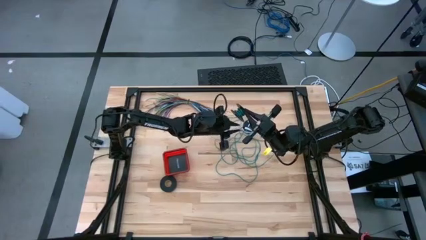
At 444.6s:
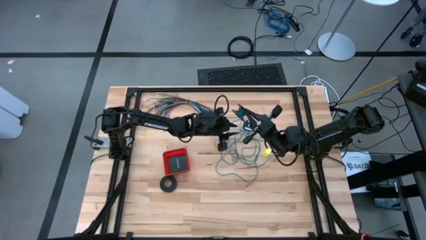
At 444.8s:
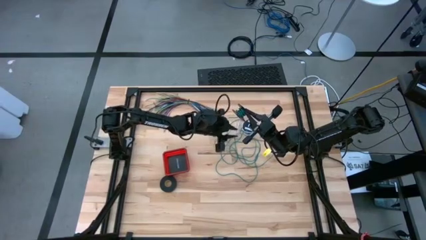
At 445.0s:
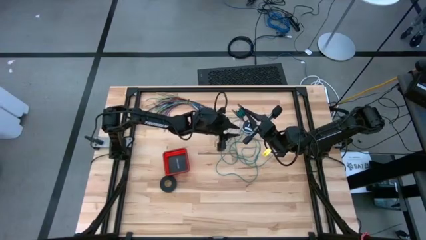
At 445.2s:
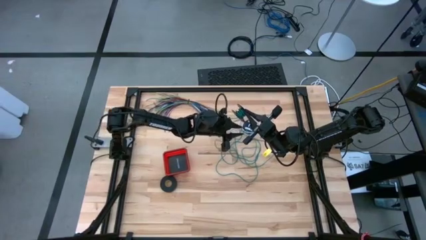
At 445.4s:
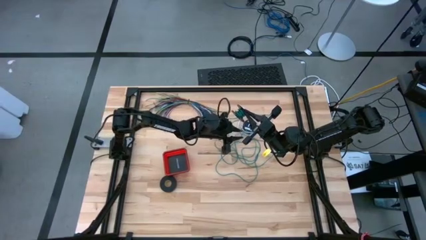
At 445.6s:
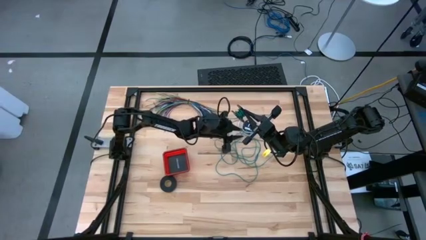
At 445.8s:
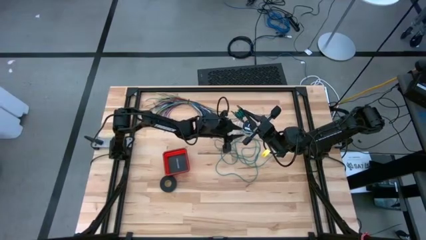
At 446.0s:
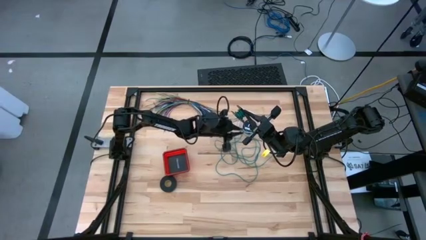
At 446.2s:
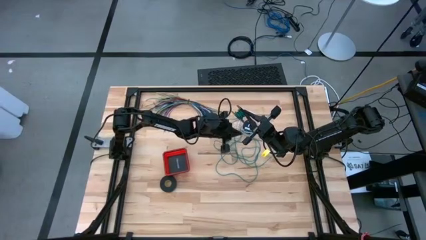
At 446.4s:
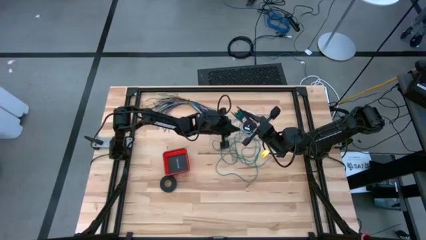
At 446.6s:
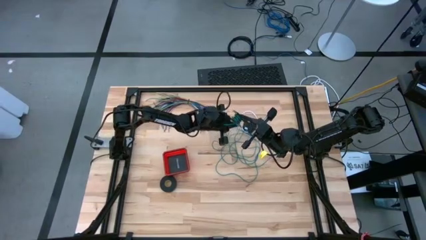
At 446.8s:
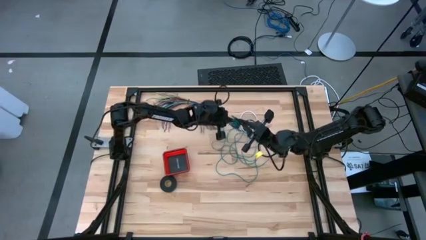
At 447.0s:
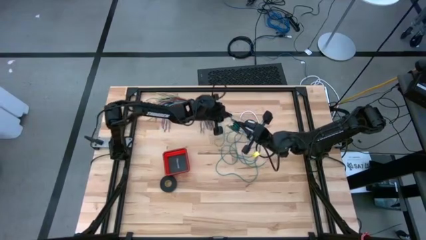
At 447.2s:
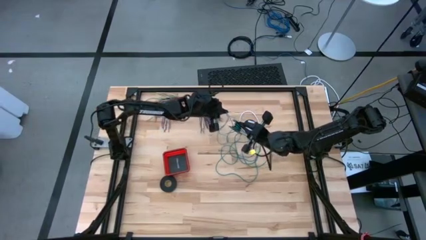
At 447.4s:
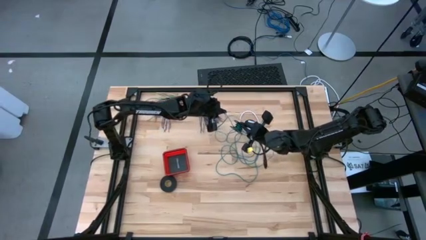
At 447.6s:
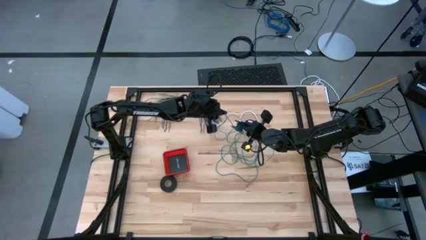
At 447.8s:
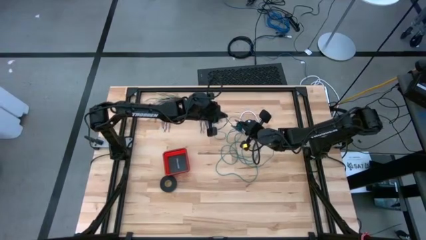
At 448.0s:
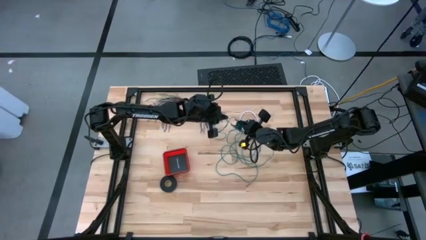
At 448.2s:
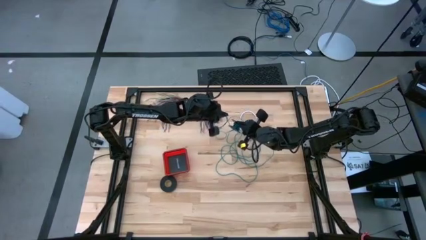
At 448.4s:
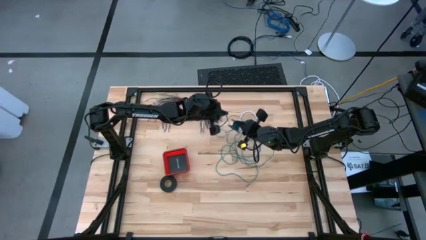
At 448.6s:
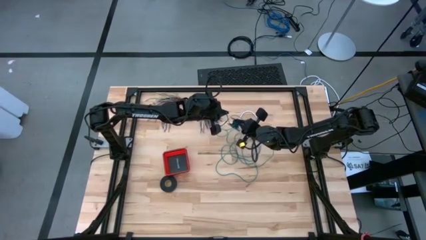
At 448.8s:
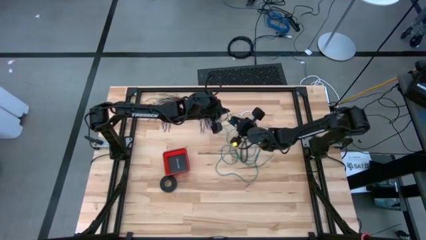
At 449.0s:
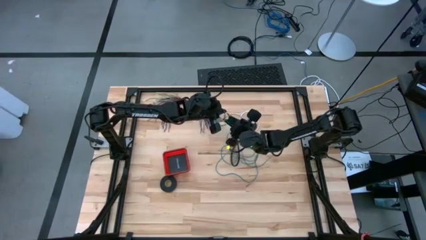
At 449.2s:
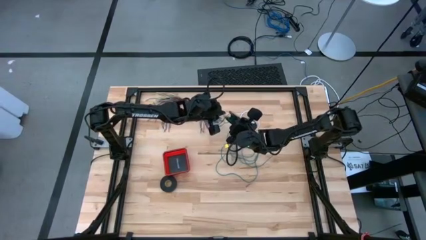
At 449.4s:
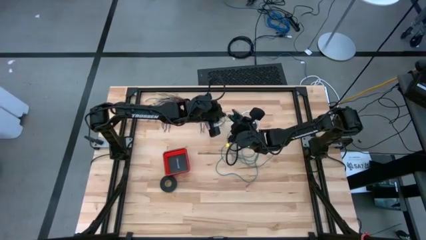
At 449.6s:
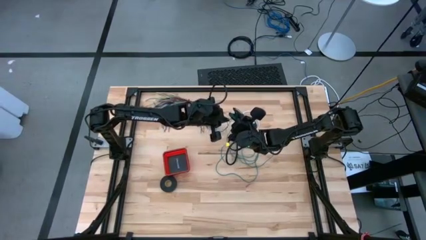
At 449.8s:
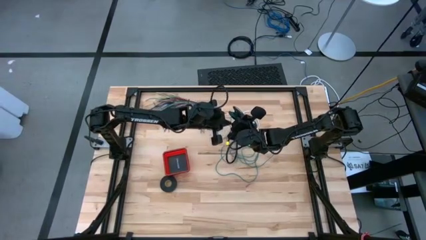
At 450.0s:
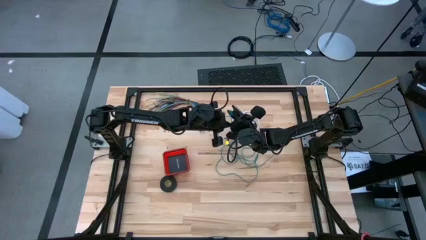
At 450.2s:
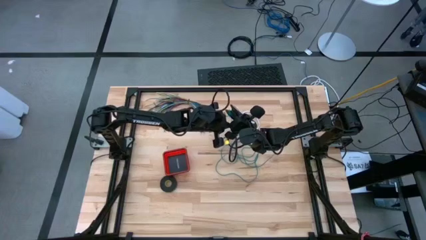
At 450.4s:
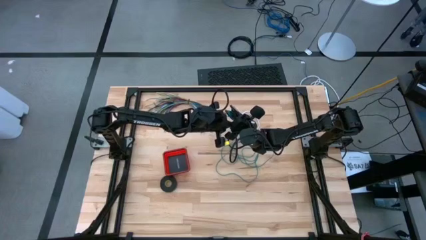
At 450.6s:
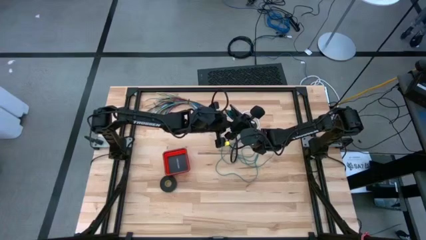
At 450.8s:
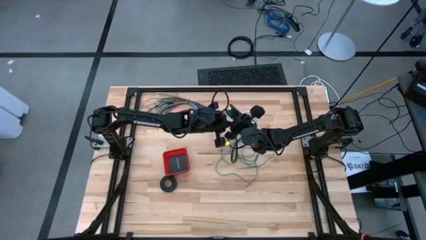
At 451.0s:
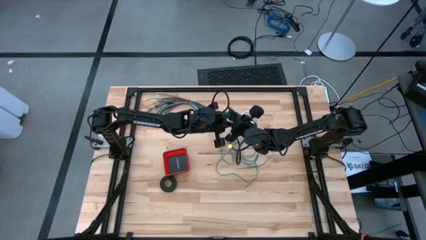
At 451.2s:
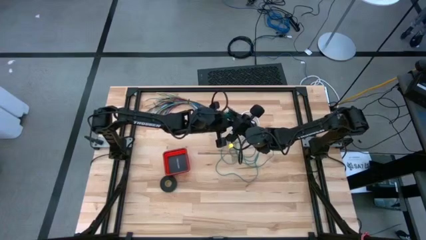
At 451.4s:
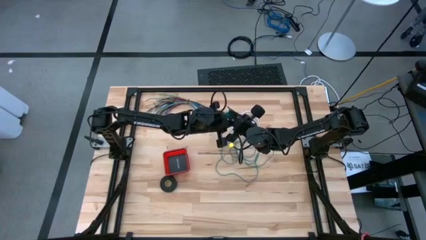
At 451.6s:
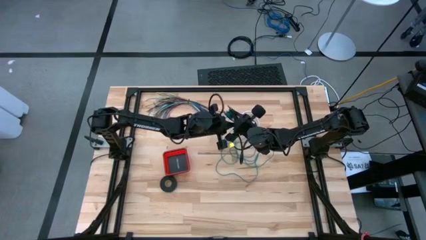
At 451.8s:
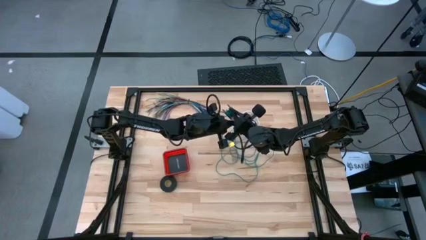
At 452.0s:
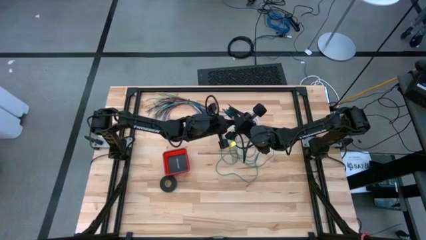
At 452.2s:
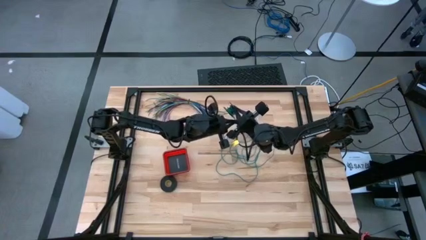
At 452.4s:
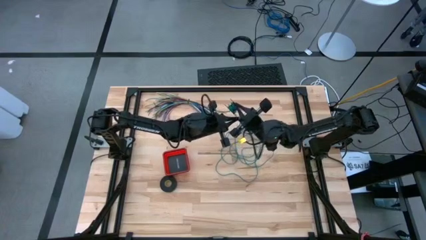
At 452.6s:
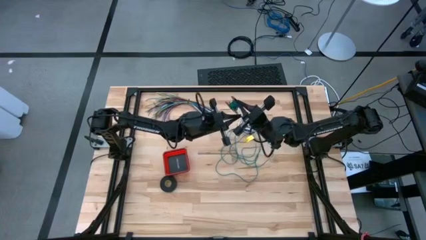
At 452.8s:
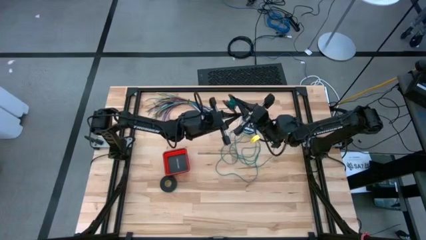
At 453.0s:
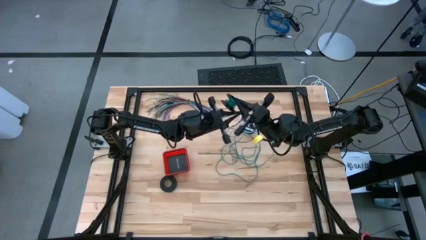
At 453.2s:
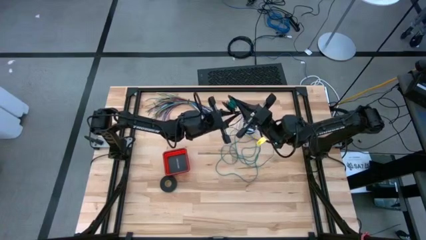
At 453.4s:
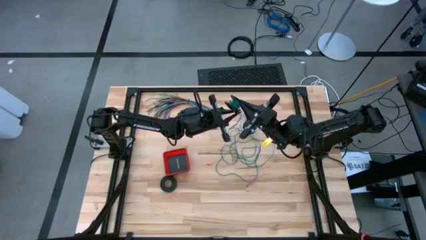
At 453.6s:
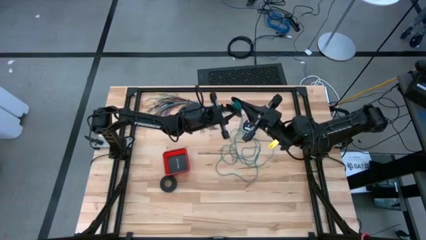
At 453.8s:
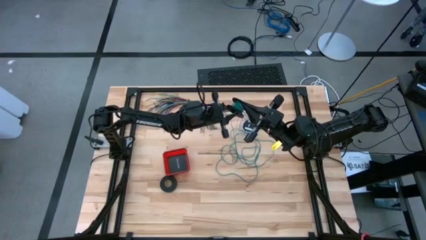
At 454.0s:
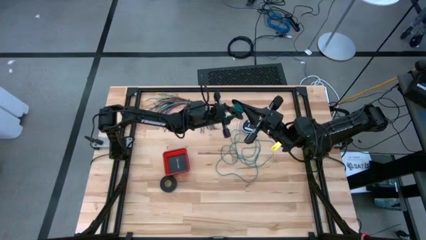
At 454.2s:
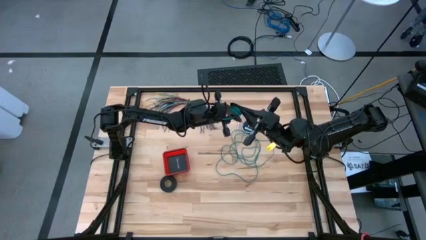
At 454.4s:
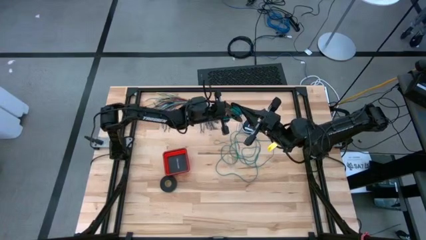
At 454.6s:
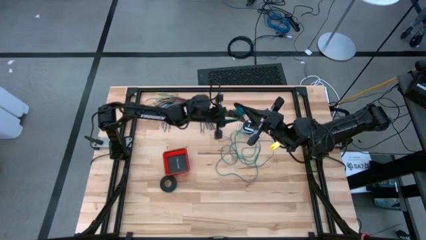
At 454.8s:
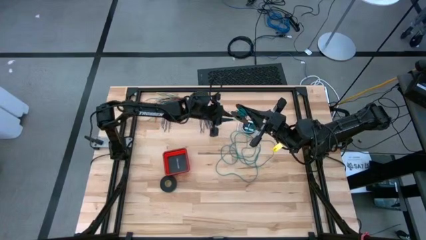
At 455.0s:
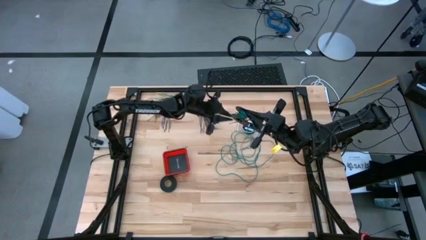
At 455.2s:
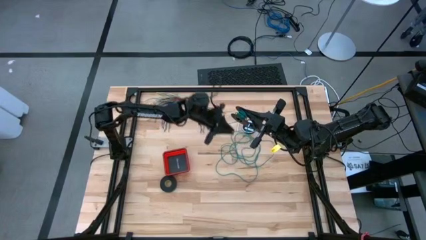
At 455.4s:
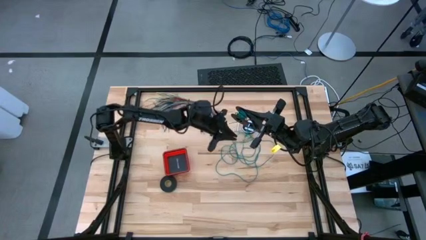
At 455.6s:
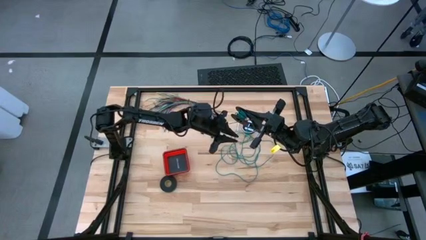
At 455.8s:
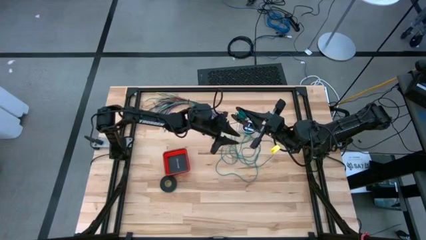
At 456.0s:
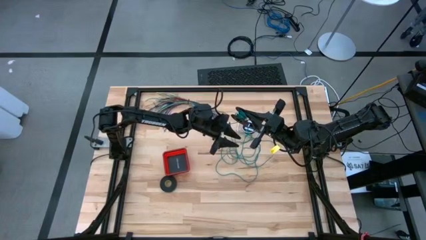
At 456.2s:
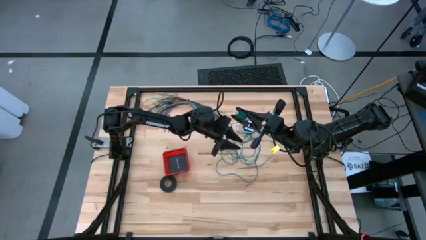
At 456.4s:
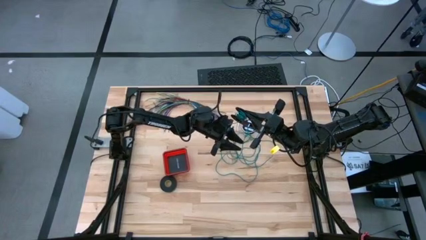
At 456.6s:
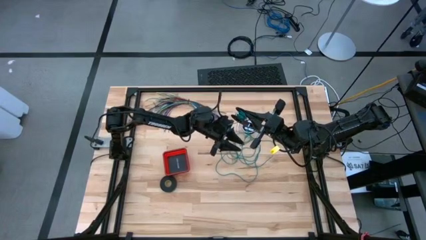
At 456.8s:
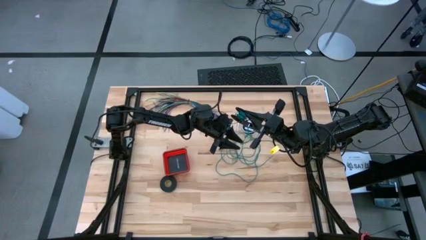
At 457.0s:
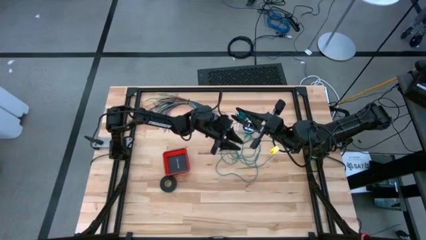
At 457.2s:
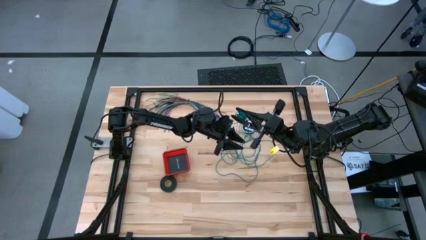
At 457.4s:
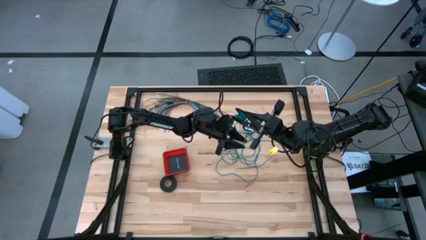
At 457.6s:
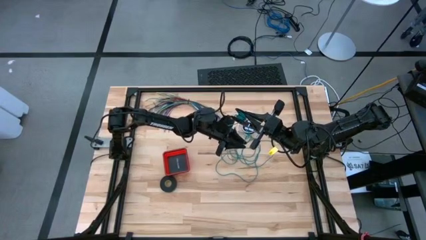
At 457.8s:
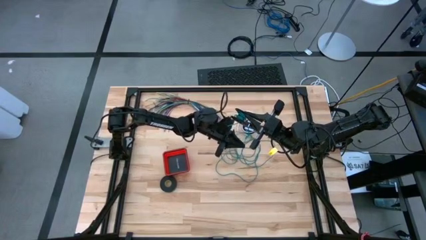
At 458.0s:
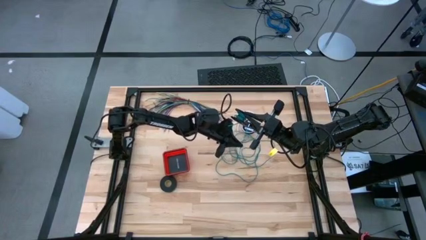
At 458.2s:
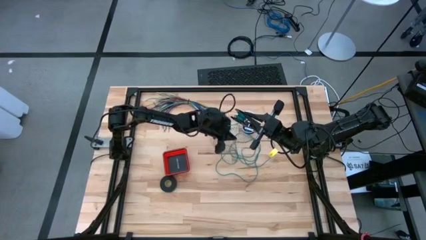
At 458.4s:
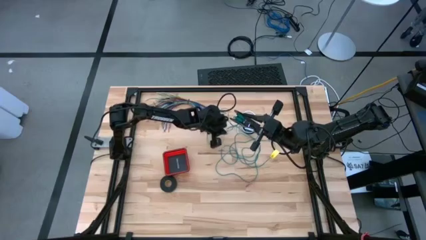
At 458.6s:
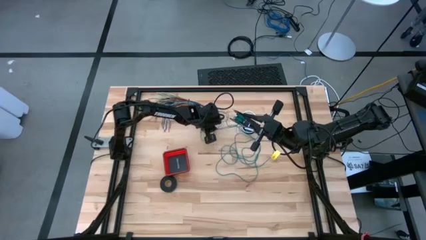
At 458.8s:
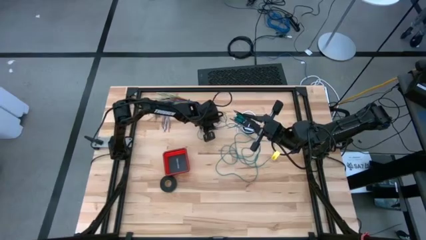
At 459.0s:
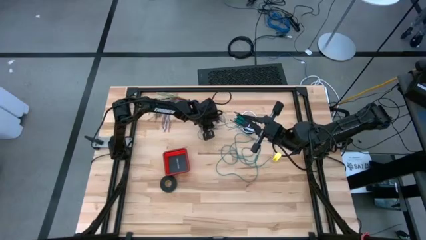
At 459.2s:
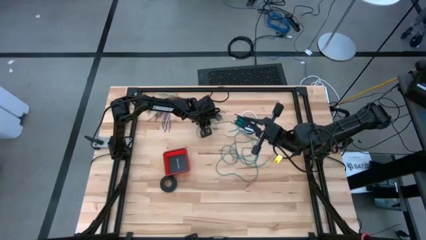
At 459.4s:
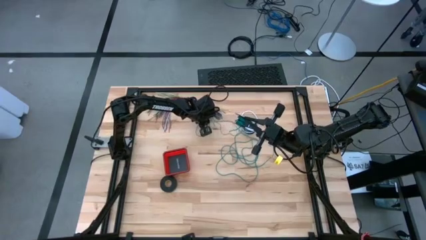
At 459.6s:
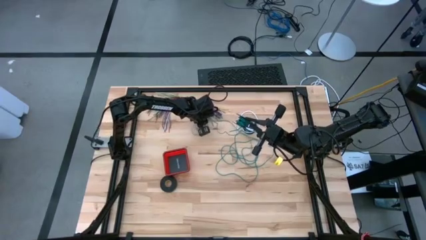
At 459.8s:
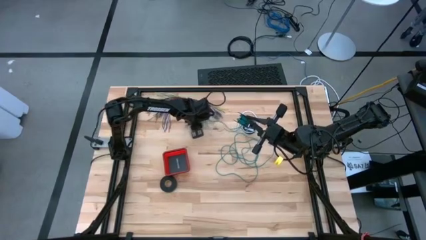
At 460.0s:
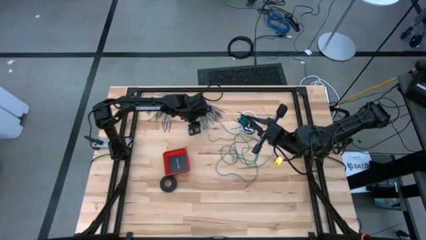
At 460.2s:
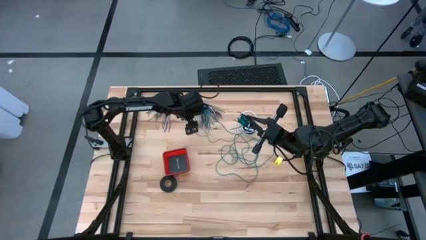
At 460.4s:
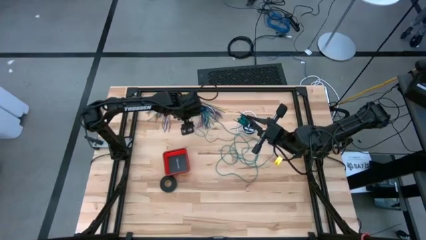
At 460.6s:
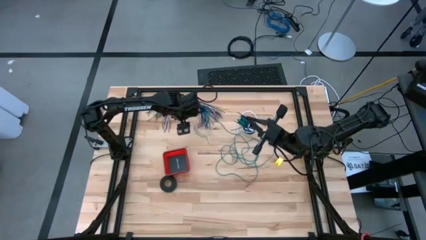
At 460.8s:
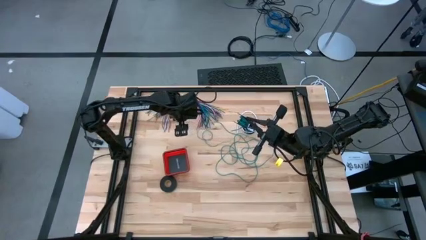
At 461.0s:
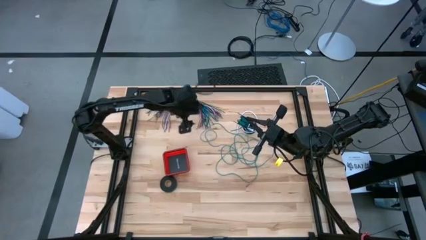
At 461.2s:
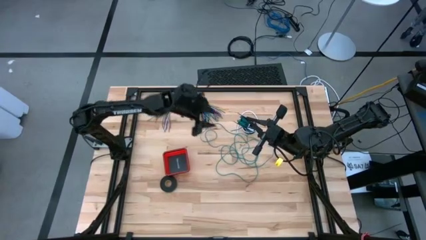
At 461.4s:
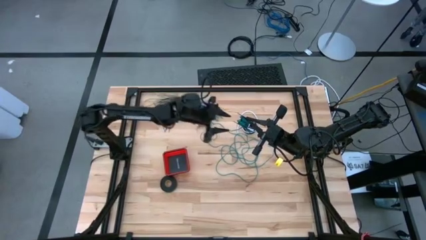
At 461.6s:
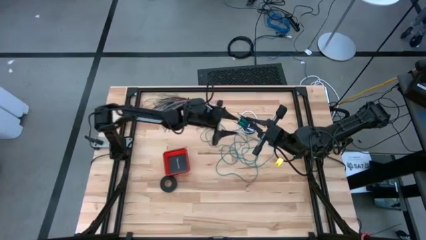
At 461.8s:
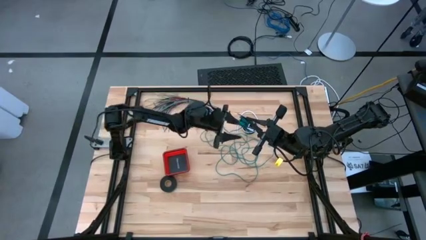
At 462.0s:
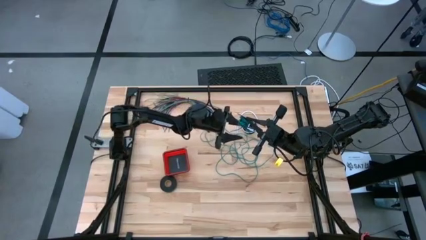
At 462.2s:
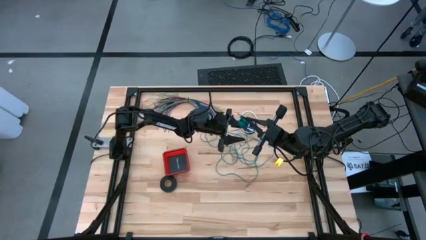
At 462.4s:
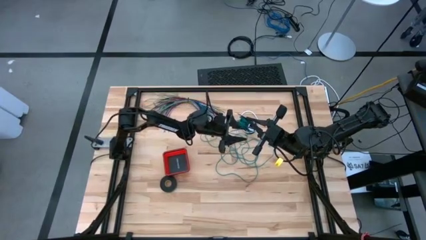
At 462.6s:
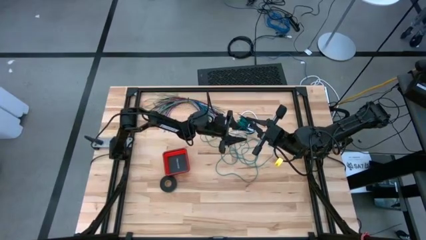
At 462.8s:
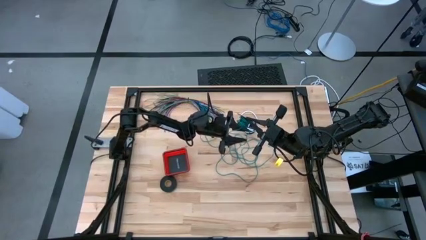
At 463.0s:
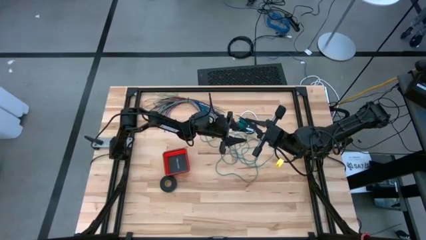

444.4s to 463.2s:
Task: Coil cords
Coil the green wire onto the spool
